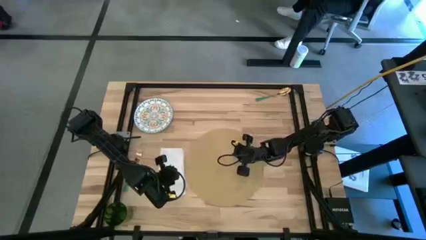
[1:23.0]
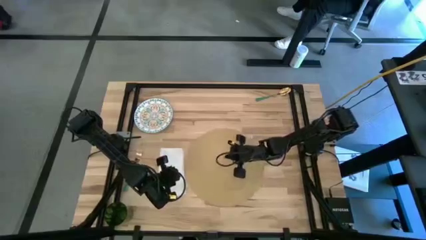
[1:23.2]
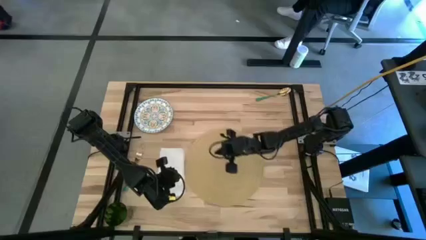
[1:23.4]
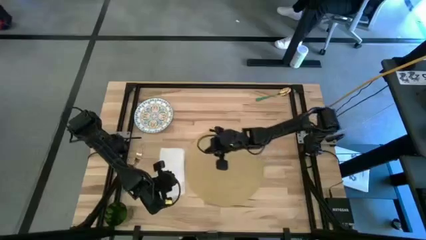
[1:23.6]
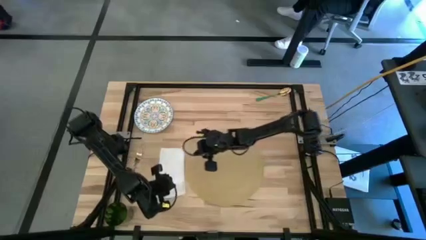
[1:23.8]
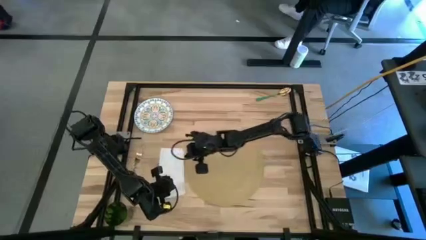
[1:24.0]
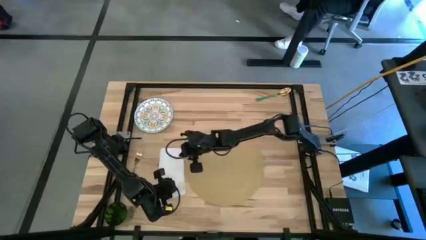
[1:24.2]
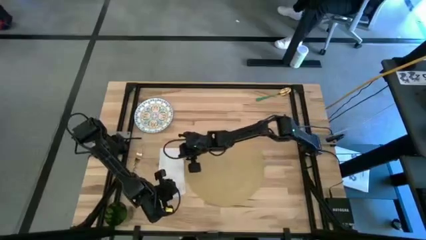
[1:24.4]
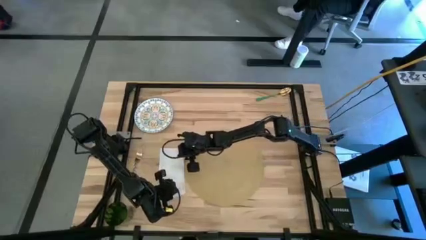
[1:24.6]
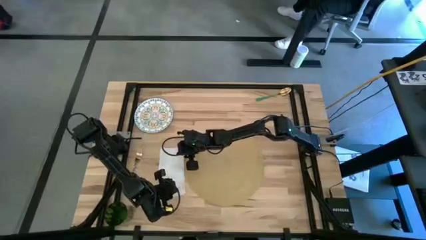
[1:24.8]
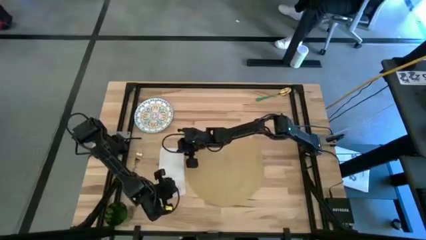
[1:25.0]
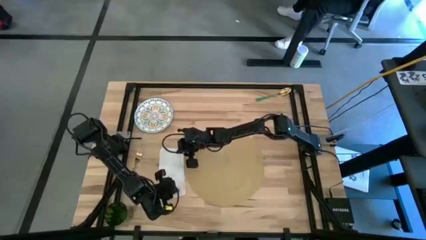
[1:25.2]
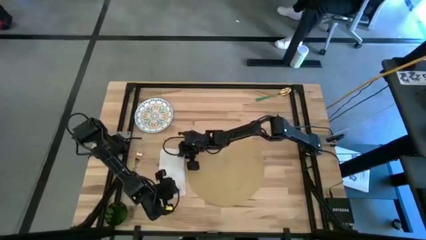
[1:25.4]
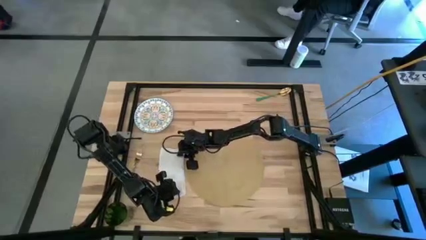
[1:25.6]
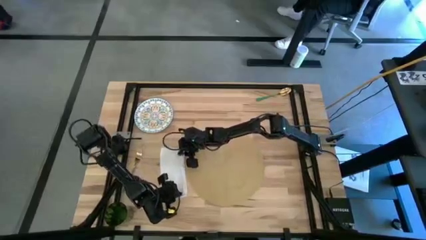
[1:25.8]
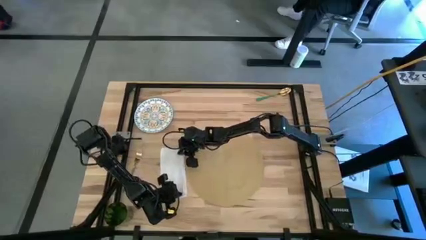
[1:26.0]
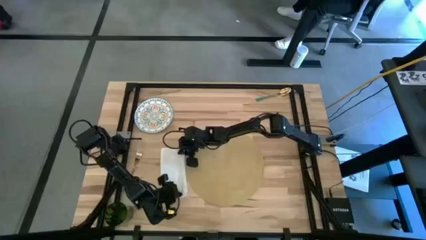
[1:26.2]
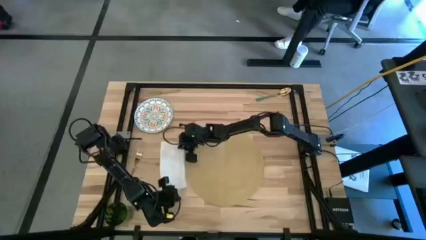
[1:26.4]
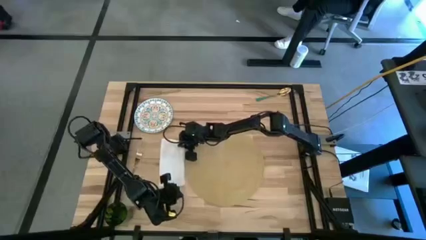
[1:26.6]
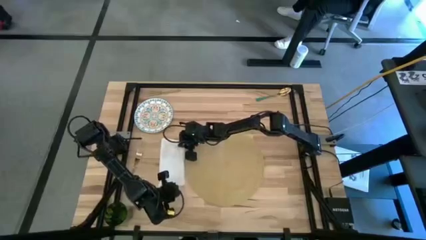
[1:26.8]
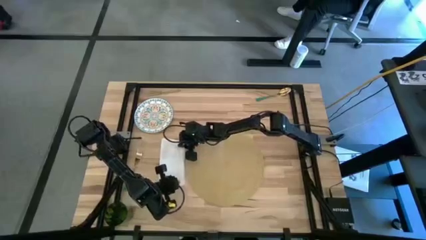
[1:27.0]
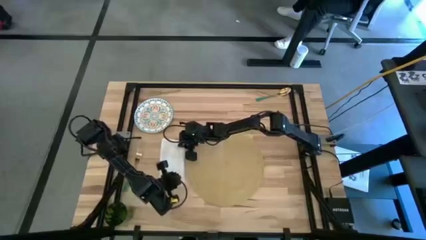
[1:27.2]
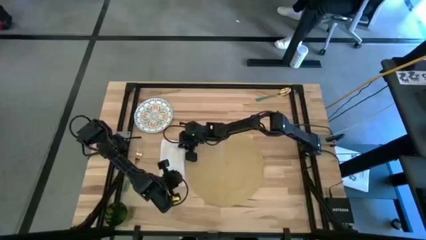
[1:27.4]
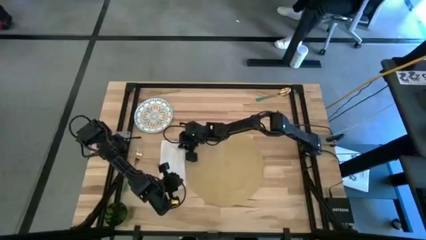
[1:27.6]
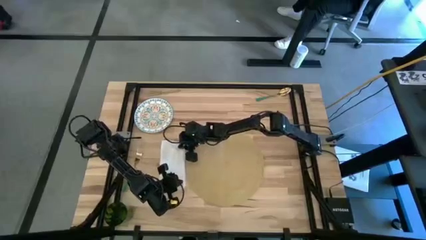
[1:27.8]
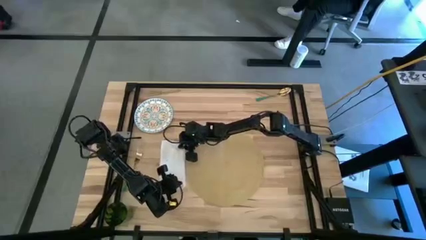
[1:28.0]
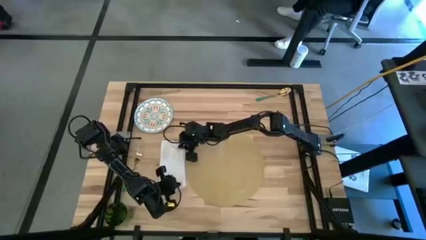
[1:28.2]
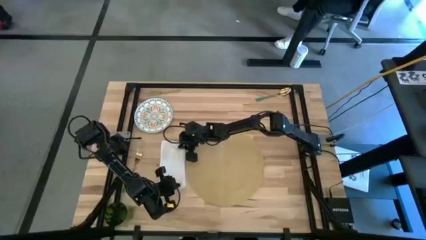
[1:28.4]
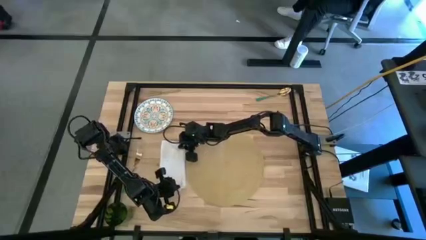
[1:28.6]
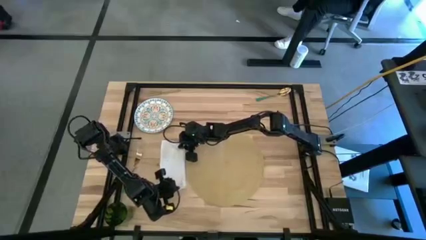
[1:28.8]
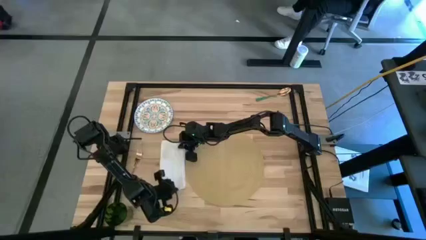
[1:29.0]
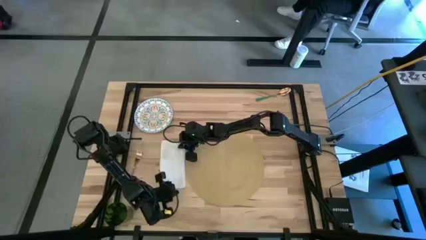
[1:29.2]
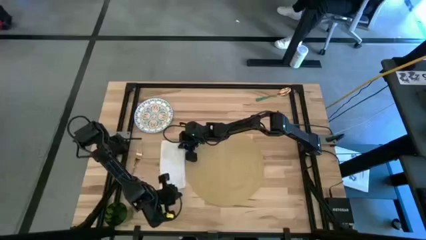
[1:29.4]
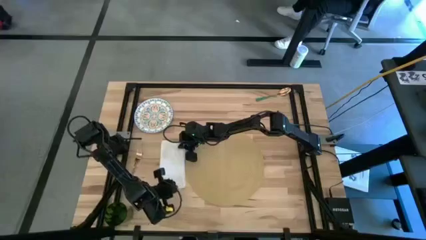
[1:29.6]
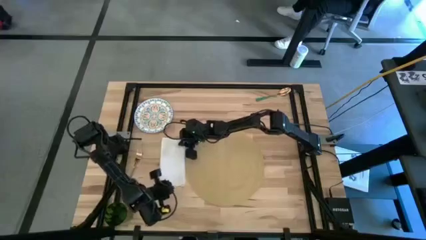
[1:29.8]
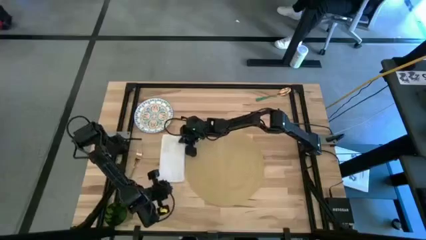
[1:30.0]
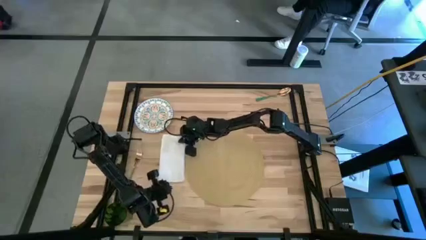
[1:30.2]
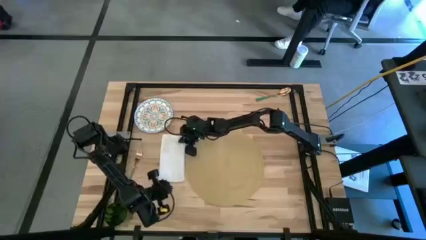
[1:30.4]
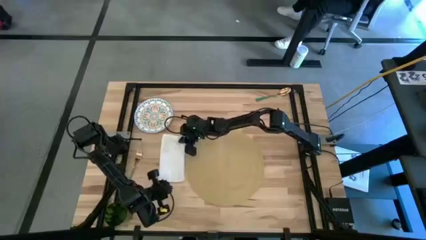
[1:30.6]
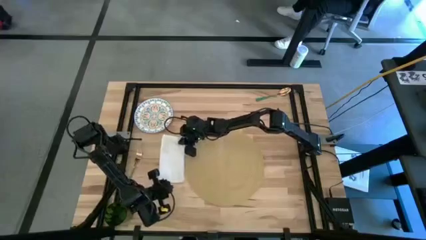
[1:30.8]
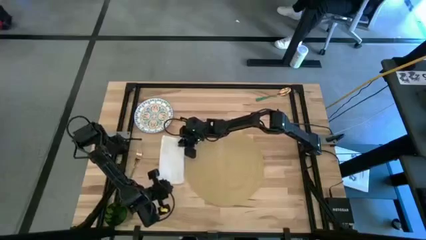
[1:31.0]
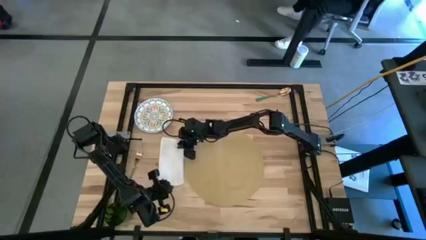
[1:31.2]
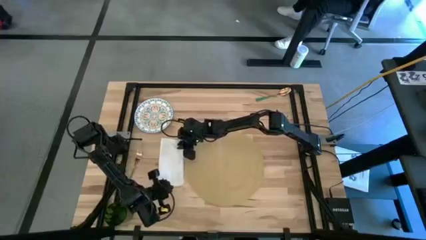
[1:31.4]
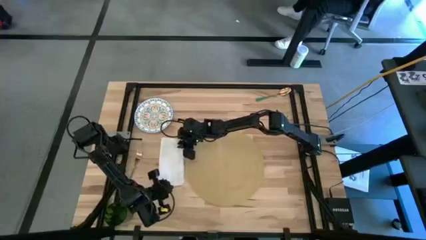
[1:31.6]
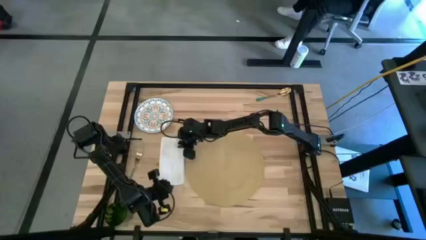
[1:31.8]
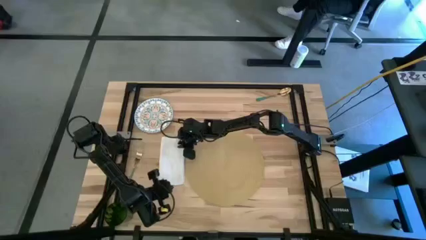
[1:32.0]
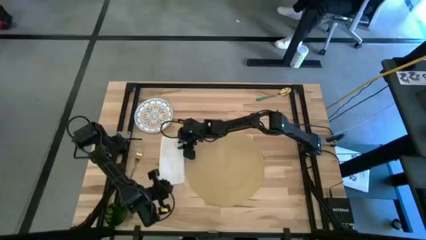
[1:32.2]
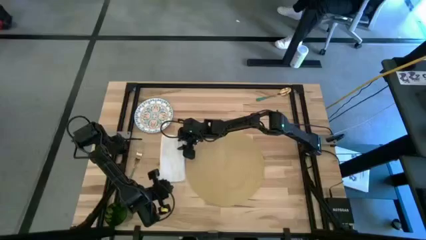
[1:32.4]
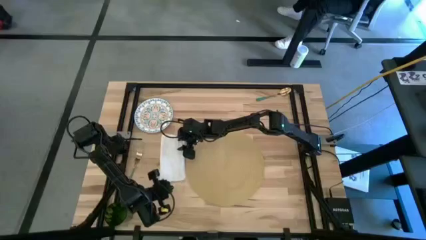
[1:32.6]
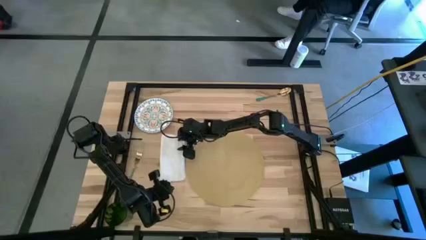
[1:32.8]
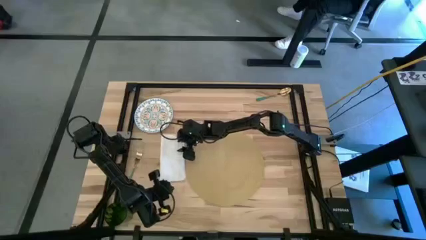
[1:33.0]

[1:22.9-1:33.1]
Task: Set table place
Adjust the white table napkin
